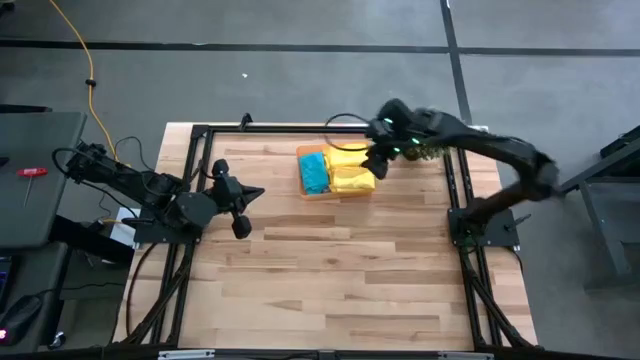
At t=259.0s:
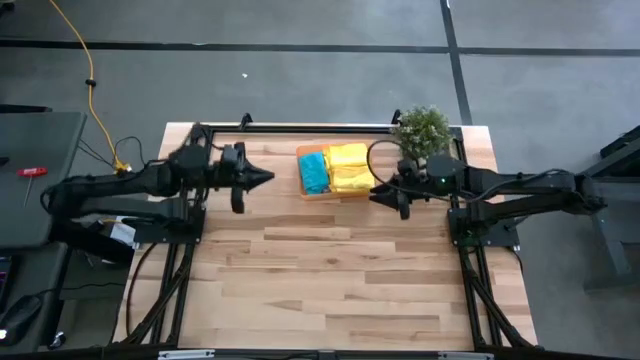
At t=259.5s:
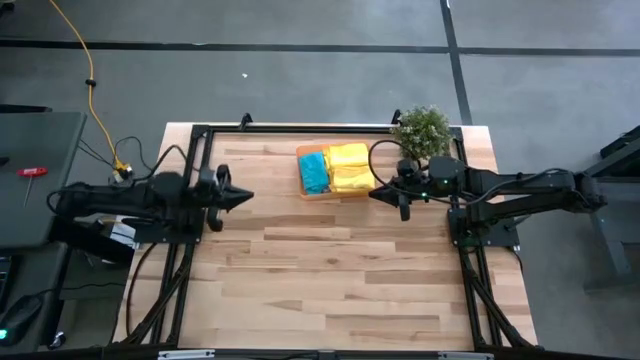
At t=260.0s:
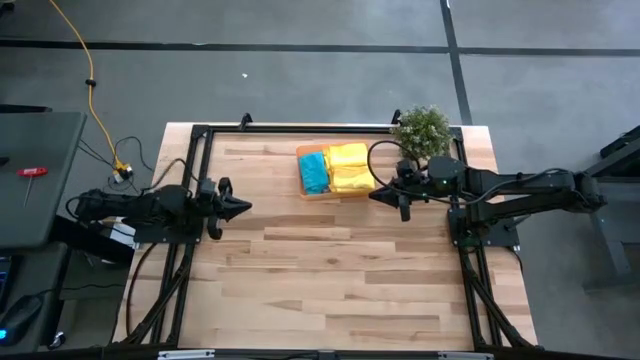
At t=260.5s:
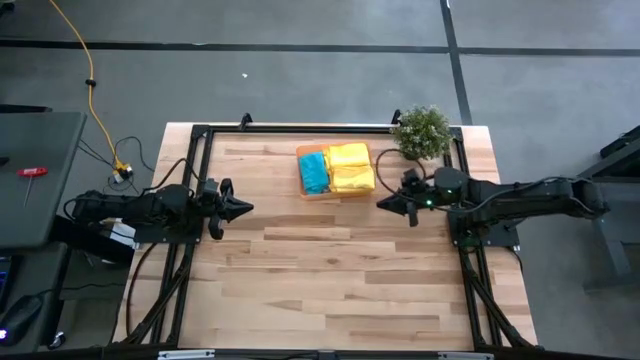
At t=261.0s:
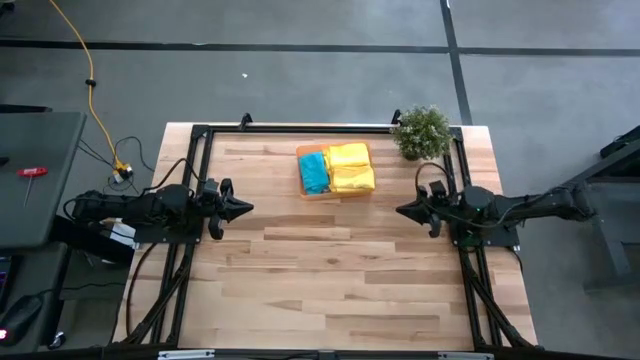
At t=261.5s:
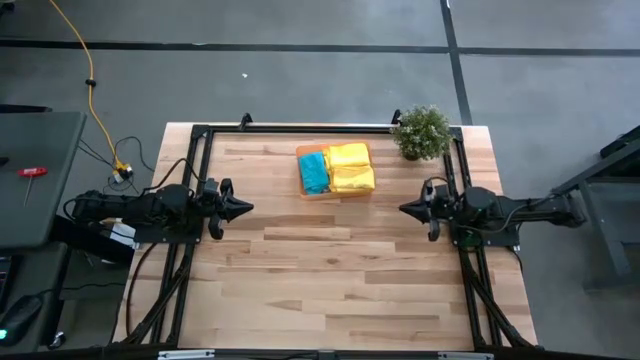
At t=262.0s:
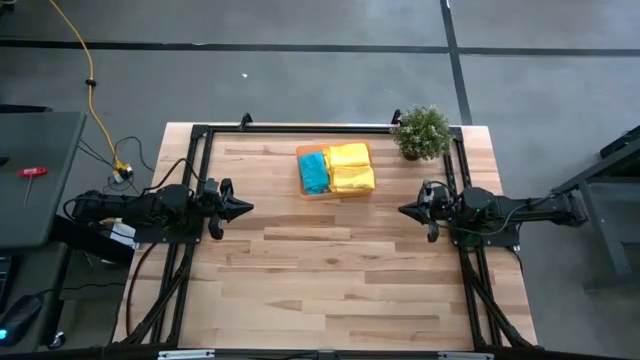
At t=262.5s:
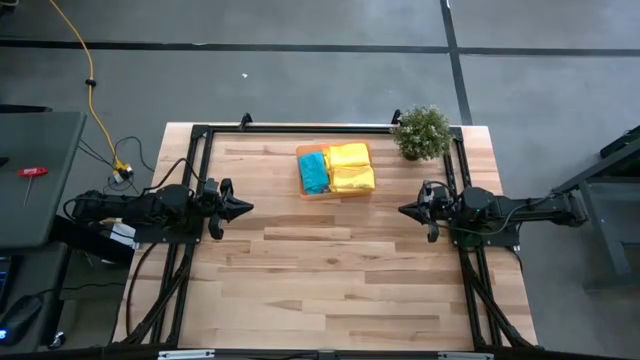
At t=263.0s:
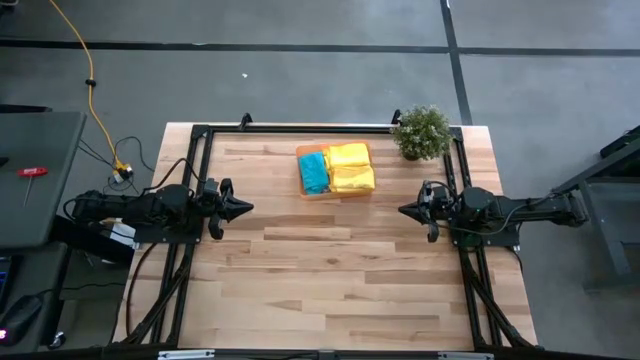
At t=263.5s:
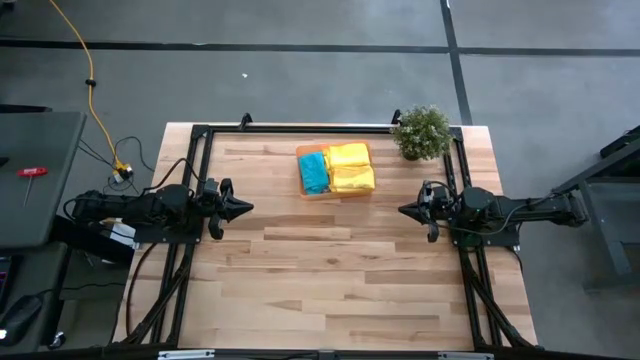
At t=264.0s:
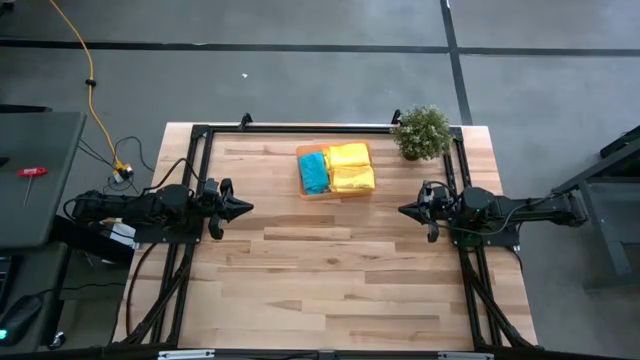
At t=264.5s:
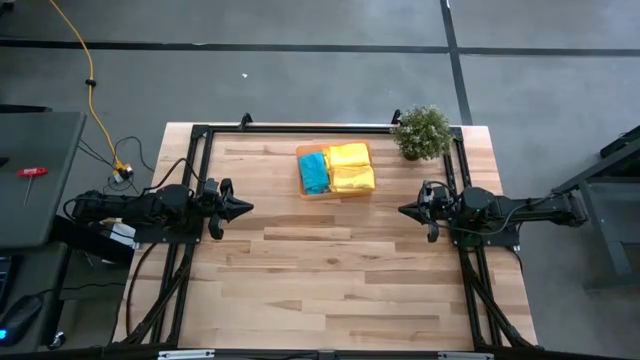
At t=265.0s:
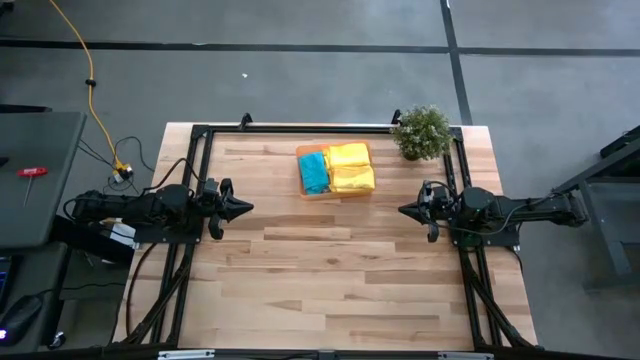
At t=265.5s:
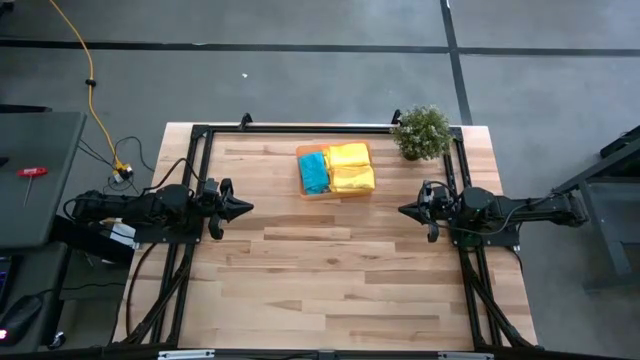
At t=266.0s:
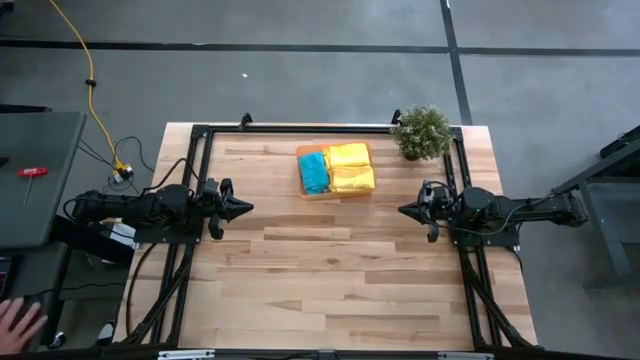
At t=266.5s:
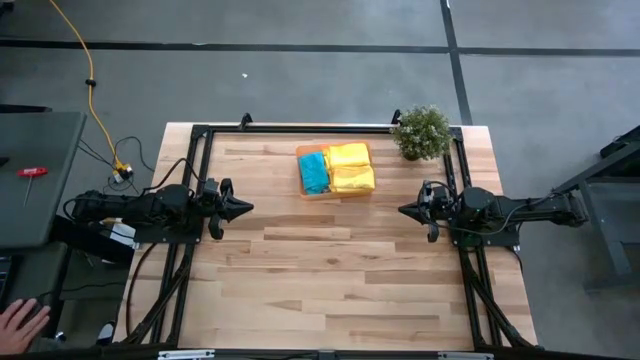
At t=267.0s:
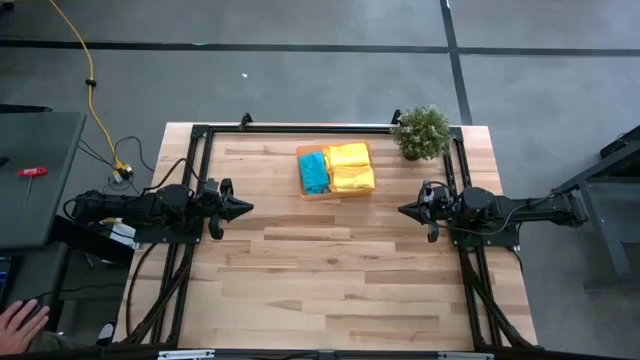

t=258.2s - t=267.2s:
Task: Fold microfiber towels
Return to Home Position

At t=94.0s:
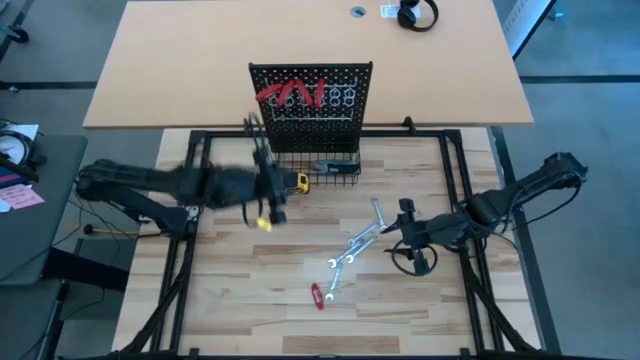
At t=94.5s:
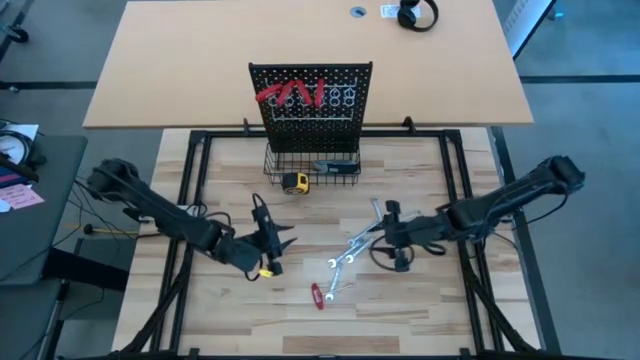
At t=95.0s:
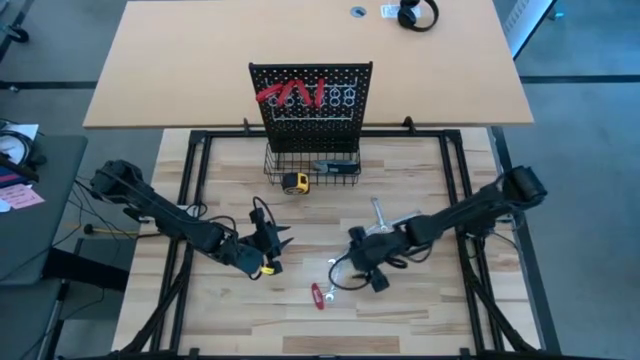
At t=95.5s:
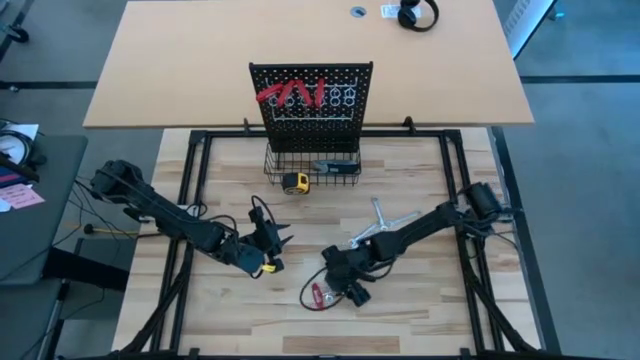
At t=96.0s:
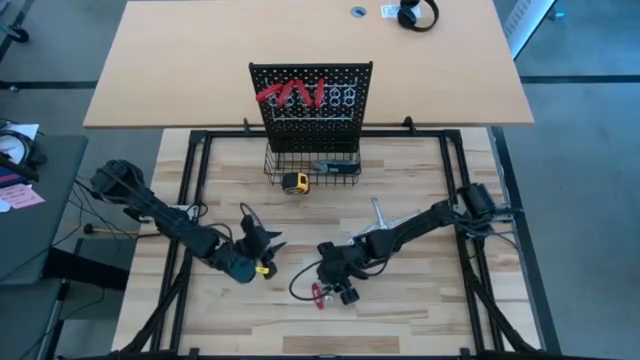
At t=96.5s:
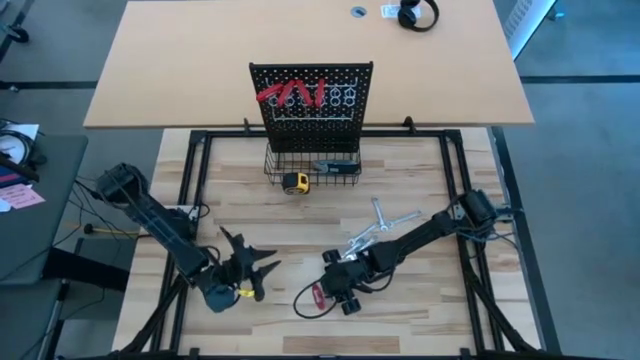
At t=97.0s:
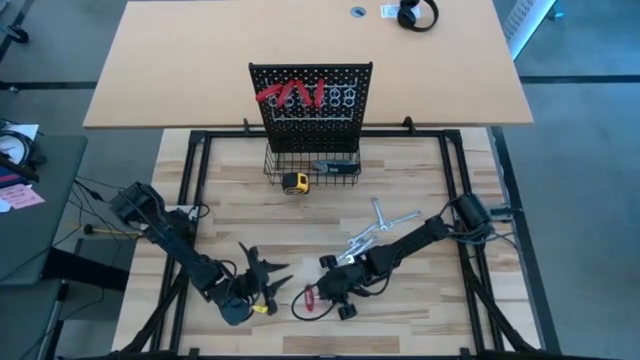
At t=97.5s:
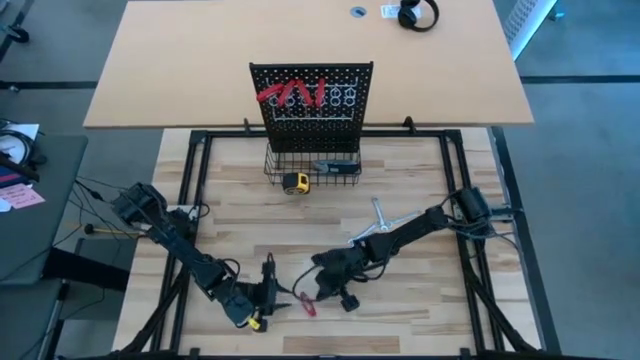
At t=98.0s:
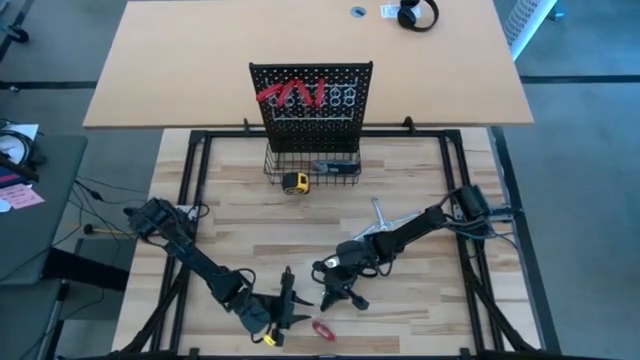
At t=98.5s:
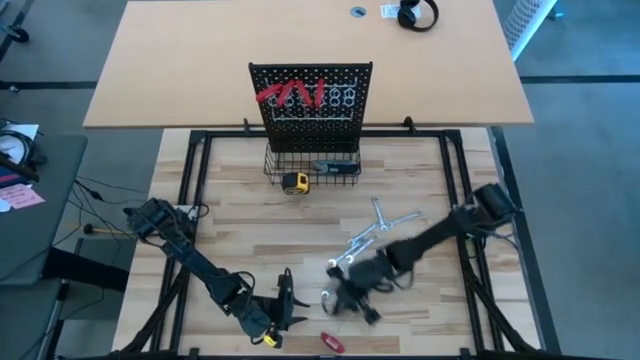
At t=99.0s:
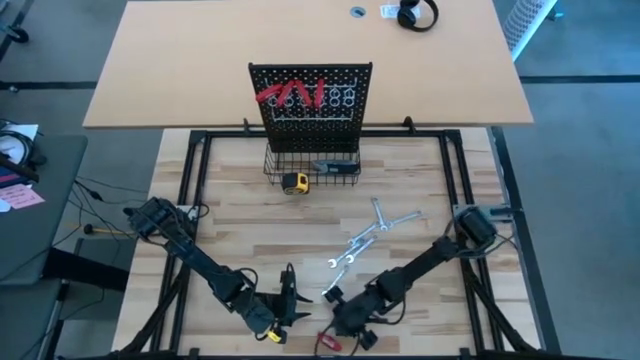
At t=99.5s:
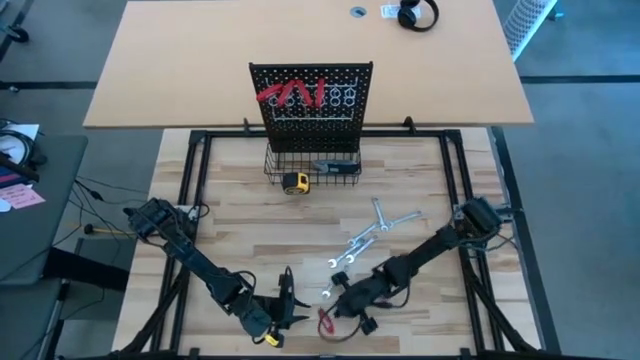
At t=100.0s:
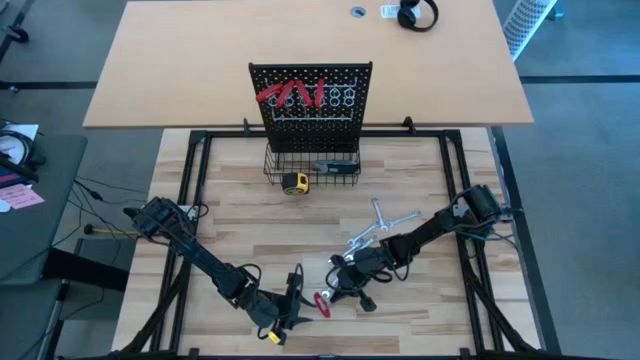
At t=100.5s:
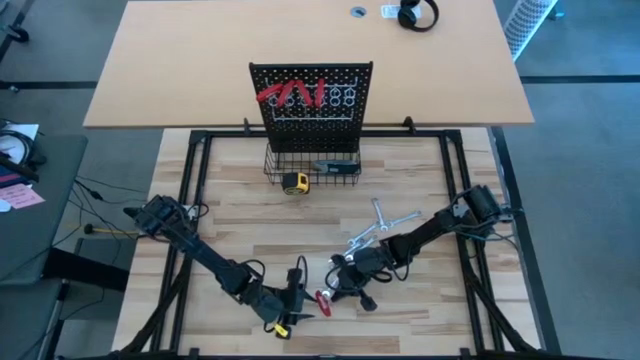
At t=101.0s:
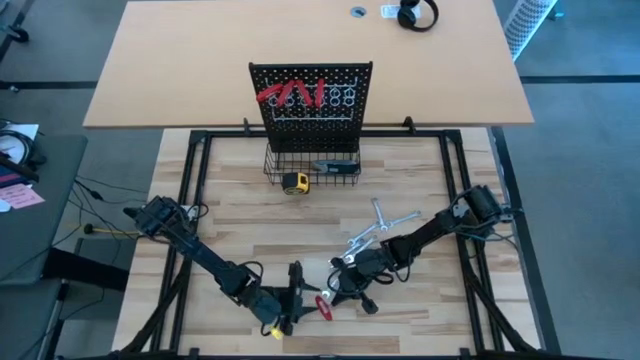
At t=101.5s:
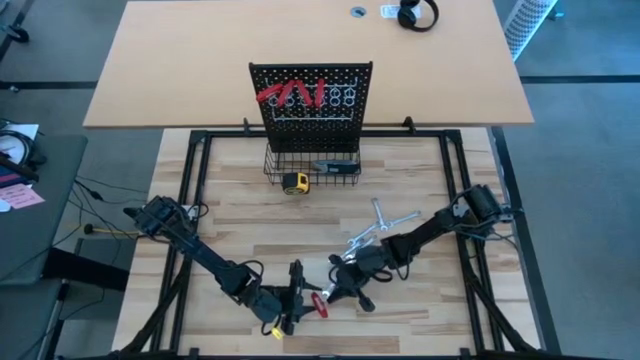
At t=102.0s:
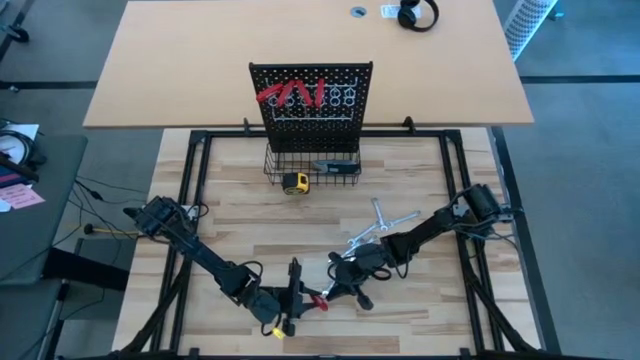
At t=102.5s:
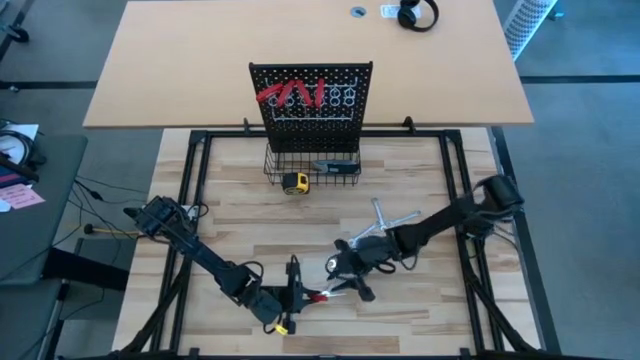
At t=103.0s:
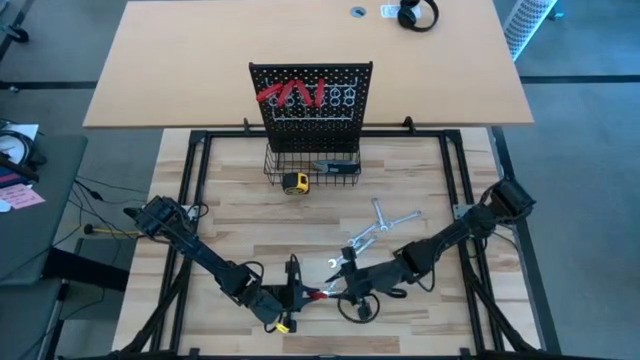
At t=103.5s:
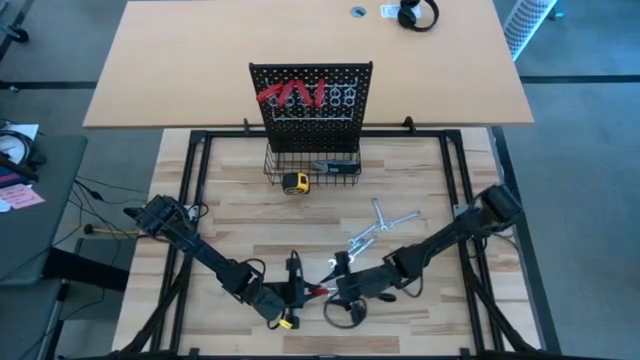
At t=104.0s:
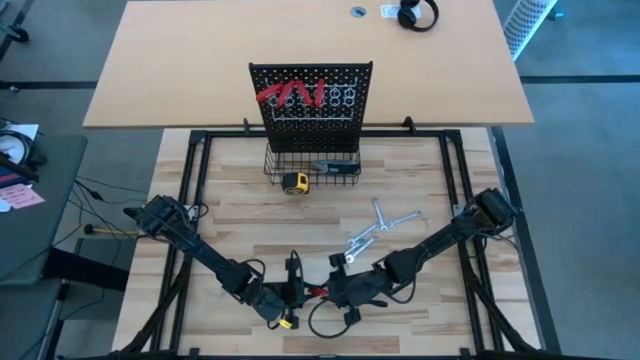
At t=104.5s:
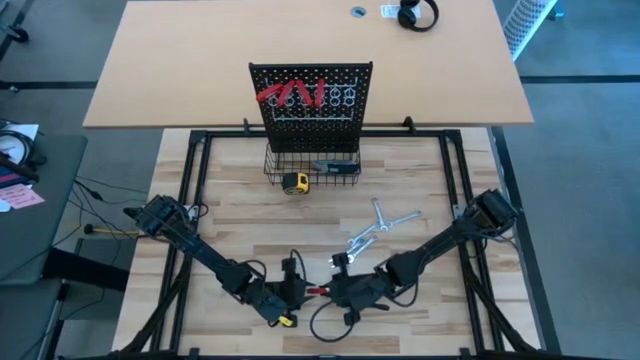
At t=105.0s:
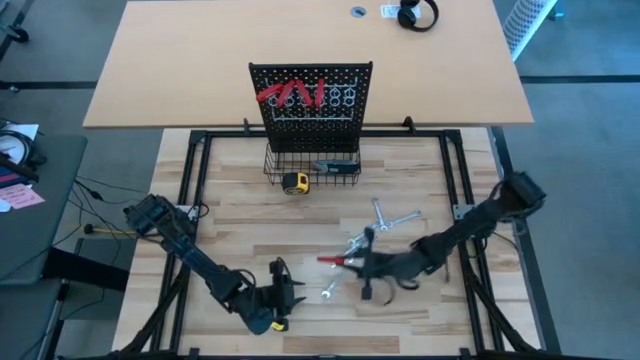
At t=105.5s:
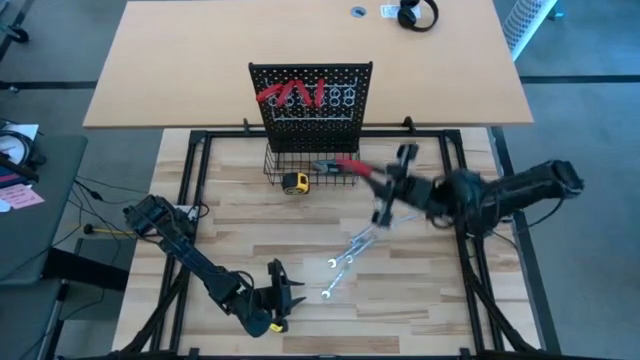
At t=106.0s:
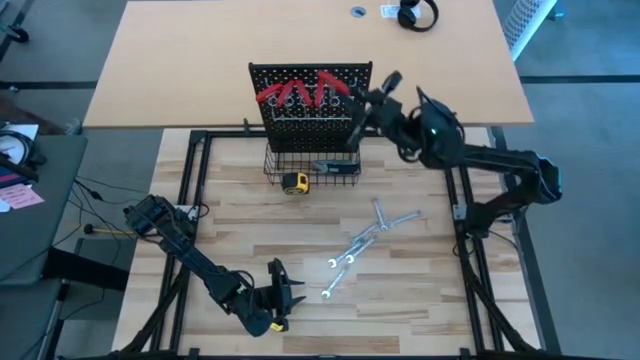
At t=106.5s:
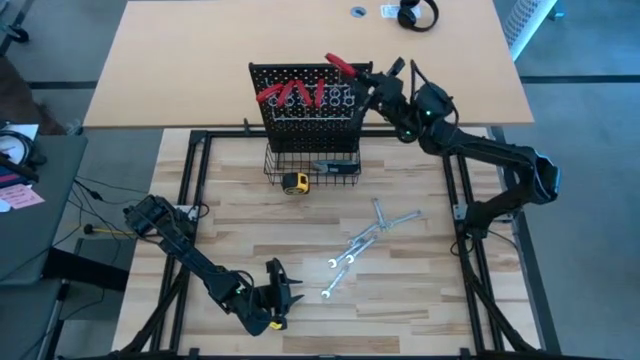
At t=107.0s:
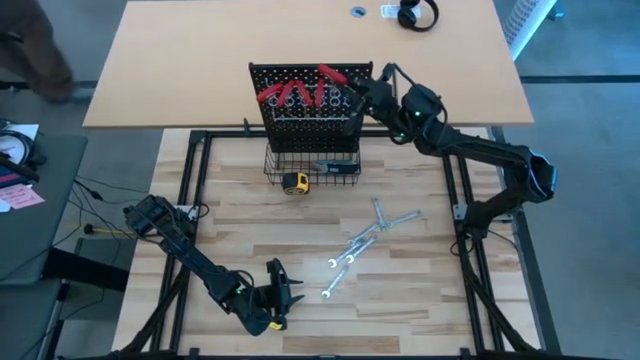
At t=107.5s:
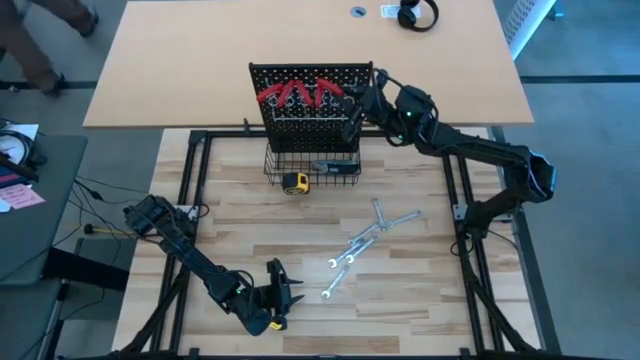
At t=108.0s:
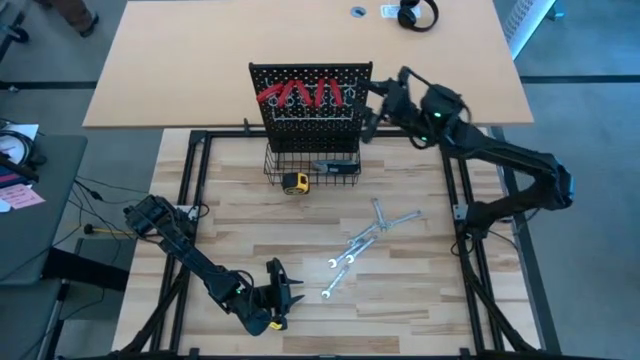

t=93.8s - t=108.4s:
Task: Hang tools onto peg board
Hang the red T-handle Allen wrench into the pegboard
